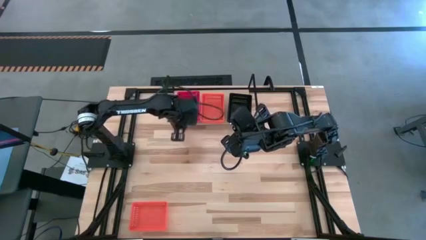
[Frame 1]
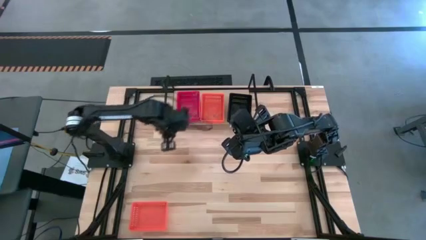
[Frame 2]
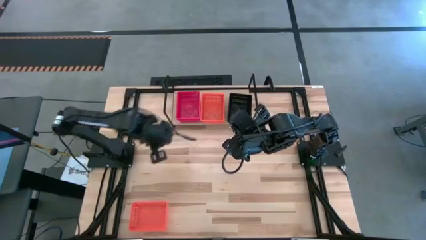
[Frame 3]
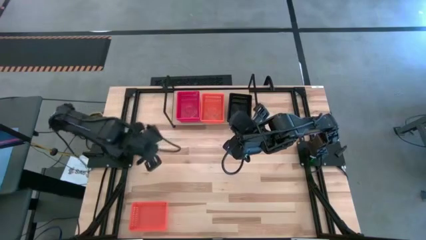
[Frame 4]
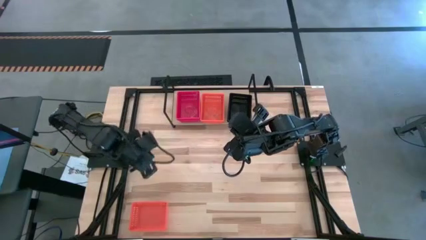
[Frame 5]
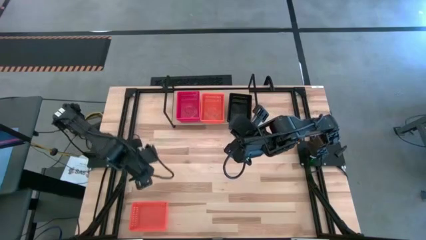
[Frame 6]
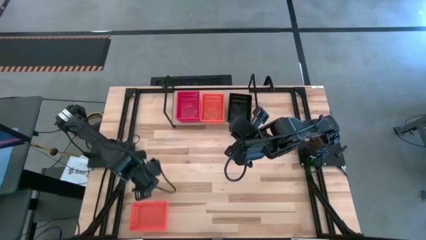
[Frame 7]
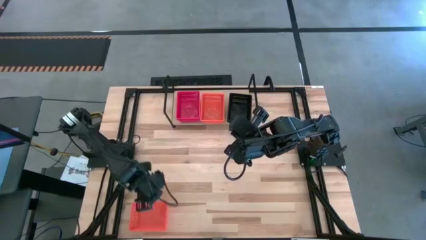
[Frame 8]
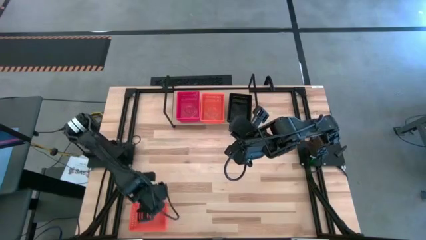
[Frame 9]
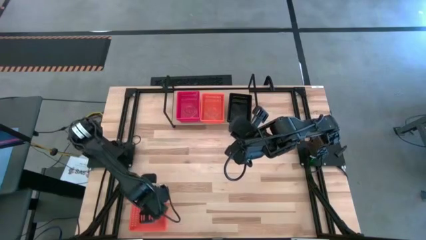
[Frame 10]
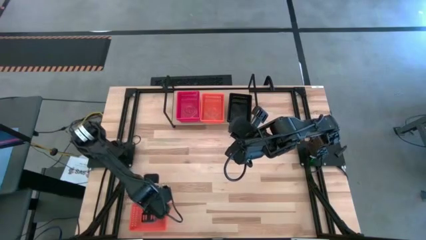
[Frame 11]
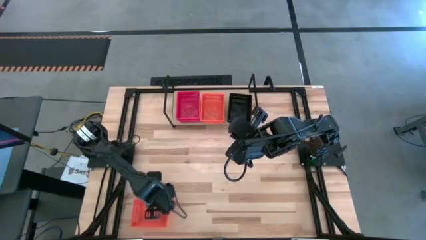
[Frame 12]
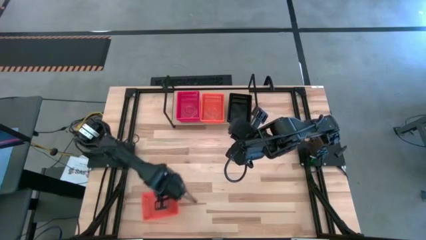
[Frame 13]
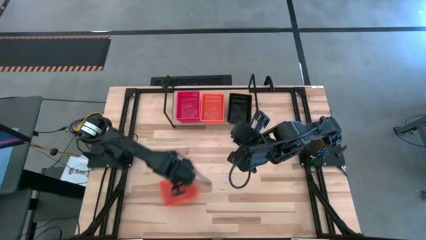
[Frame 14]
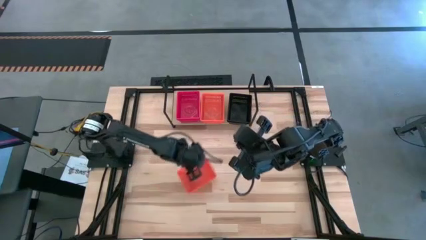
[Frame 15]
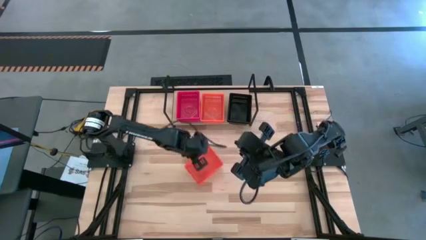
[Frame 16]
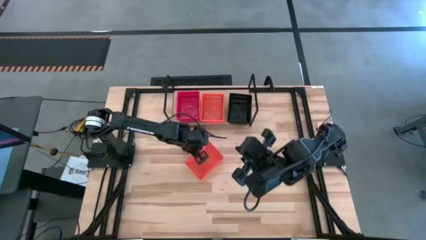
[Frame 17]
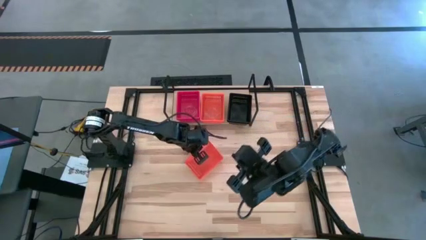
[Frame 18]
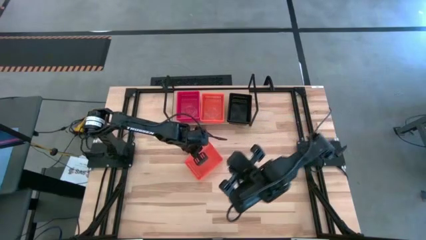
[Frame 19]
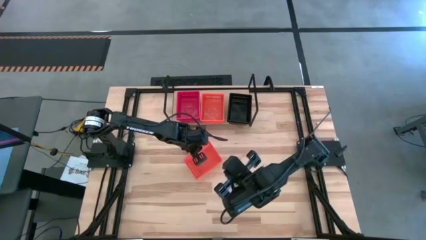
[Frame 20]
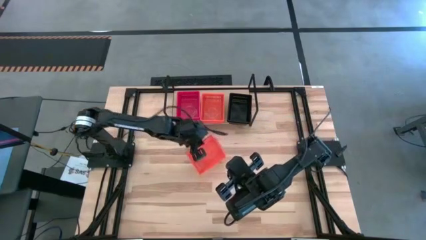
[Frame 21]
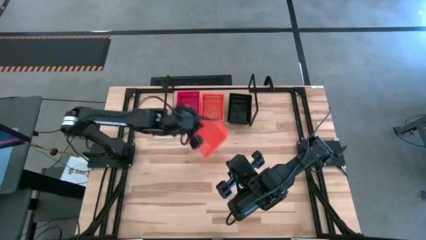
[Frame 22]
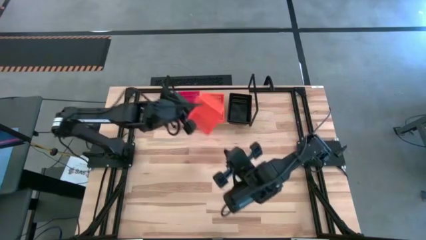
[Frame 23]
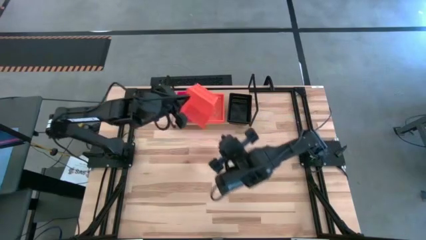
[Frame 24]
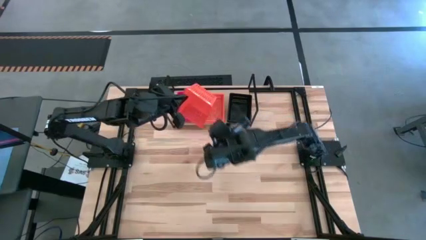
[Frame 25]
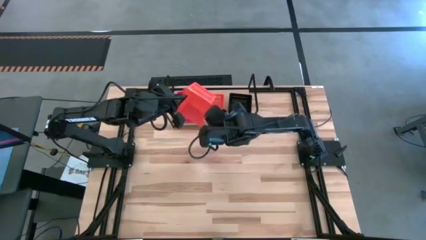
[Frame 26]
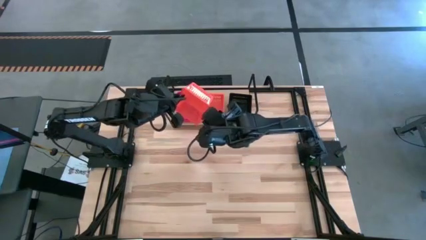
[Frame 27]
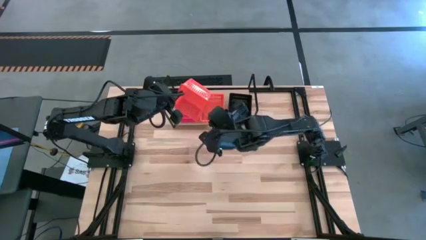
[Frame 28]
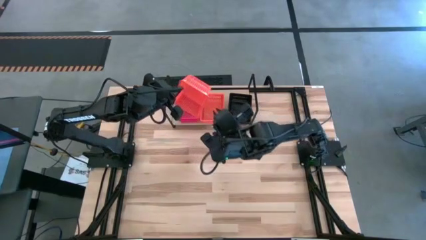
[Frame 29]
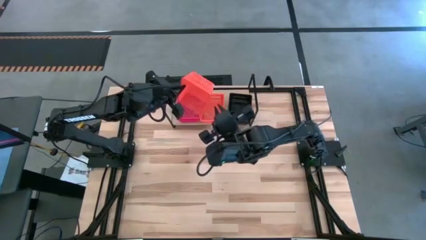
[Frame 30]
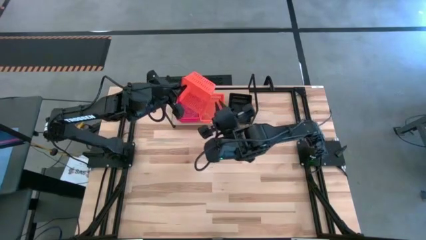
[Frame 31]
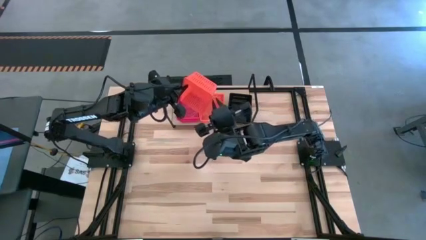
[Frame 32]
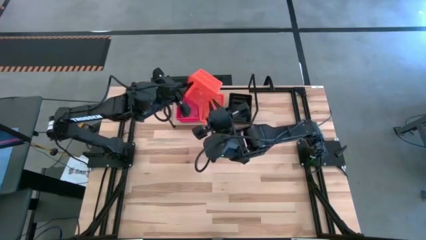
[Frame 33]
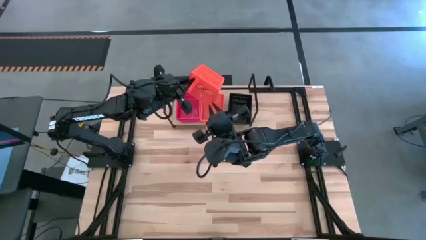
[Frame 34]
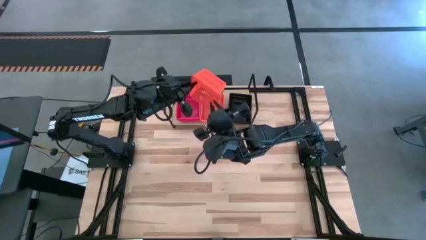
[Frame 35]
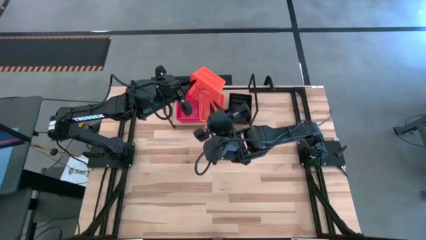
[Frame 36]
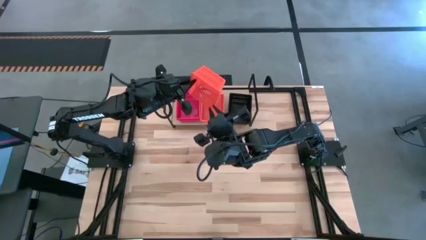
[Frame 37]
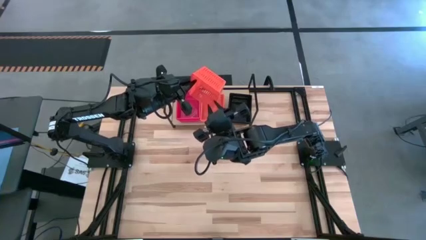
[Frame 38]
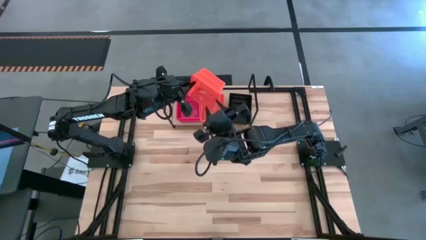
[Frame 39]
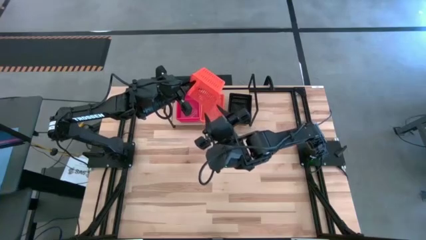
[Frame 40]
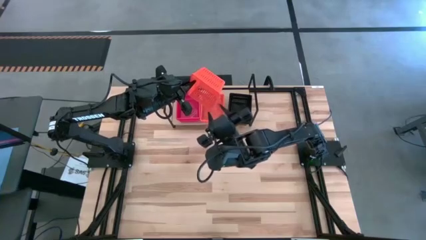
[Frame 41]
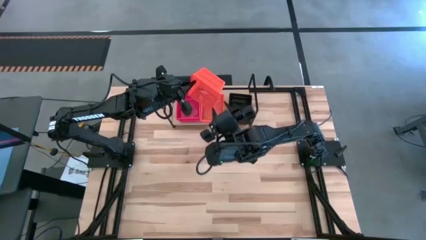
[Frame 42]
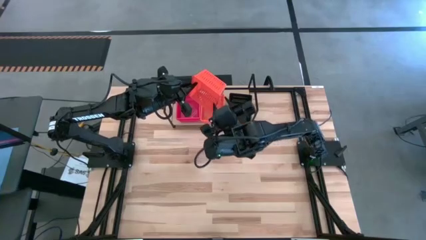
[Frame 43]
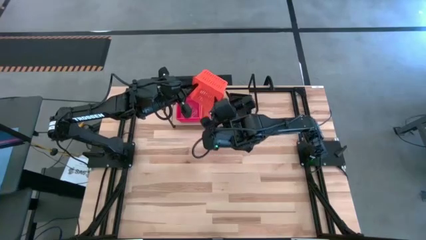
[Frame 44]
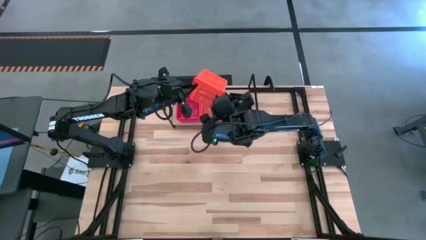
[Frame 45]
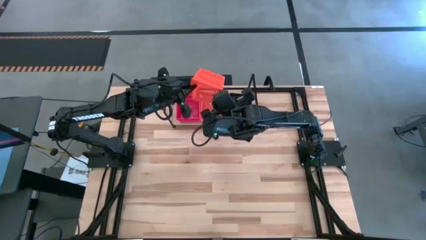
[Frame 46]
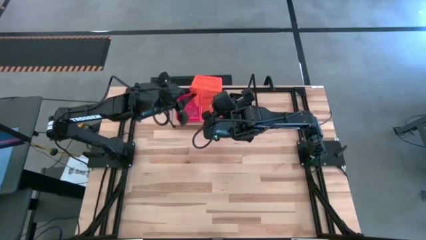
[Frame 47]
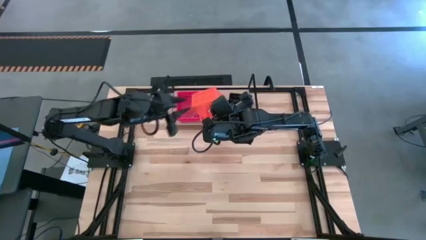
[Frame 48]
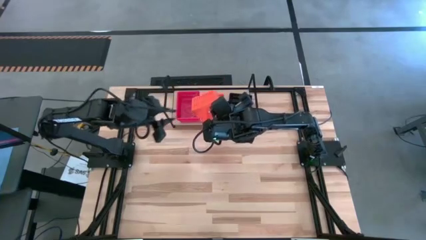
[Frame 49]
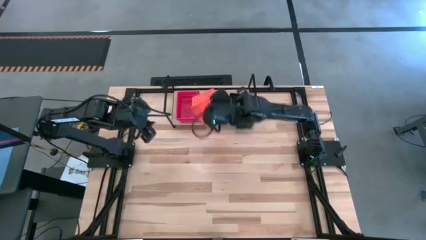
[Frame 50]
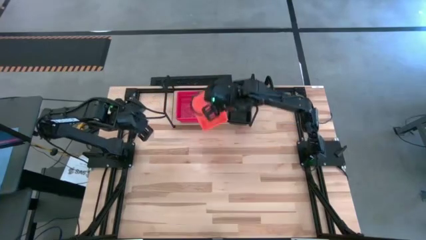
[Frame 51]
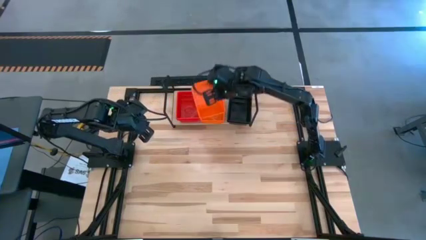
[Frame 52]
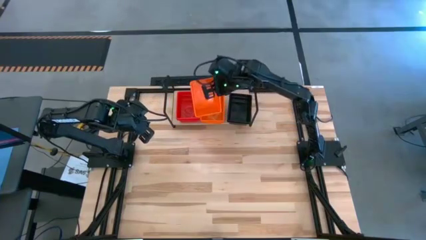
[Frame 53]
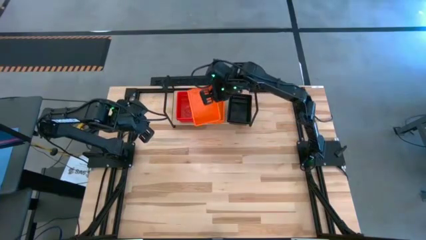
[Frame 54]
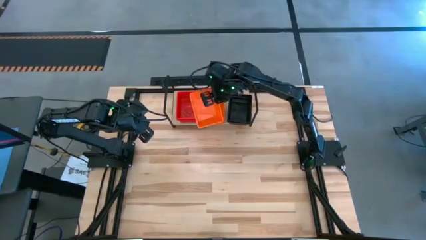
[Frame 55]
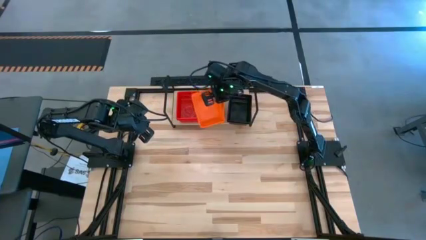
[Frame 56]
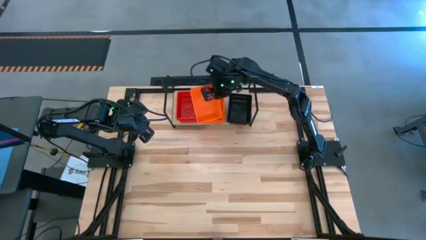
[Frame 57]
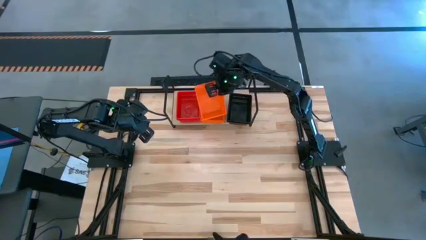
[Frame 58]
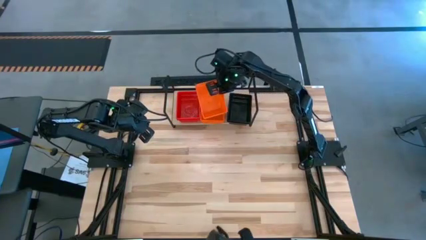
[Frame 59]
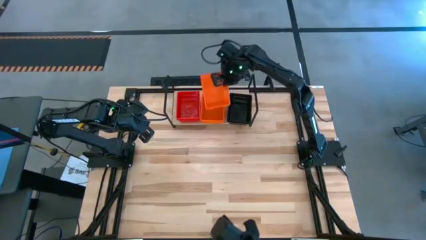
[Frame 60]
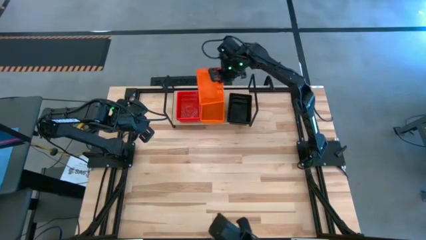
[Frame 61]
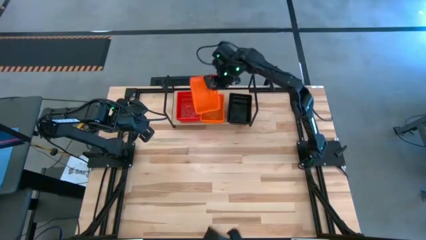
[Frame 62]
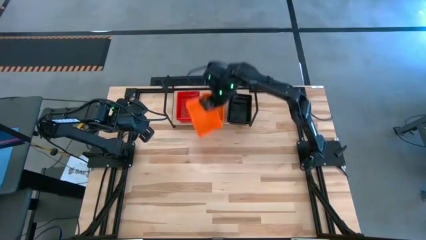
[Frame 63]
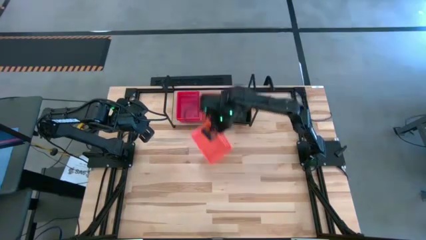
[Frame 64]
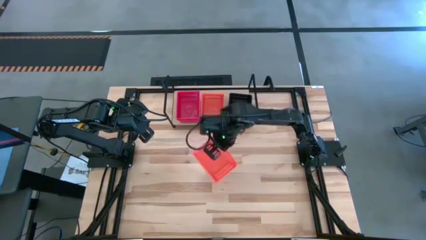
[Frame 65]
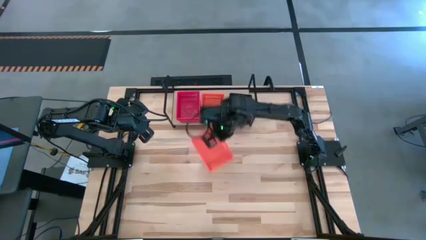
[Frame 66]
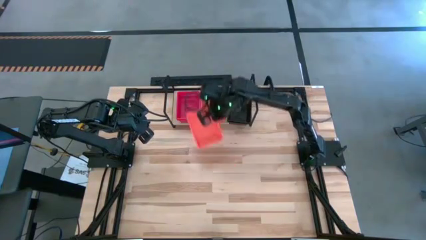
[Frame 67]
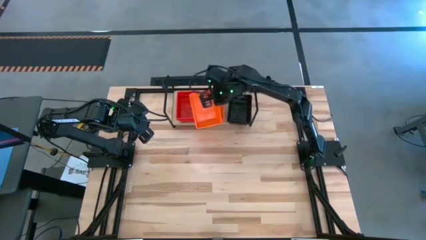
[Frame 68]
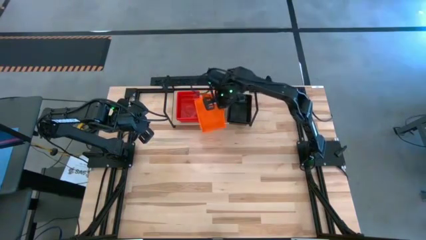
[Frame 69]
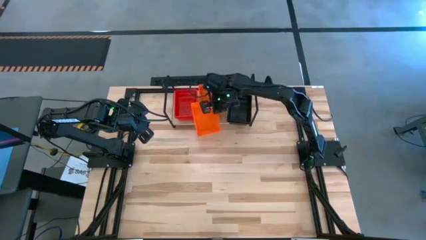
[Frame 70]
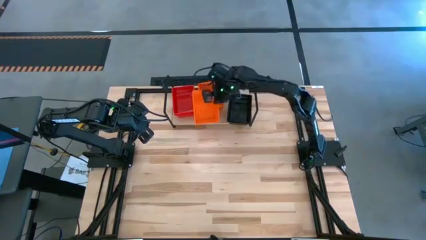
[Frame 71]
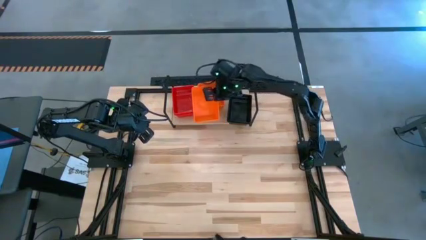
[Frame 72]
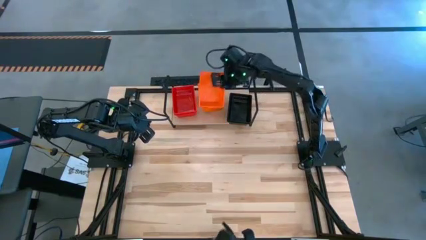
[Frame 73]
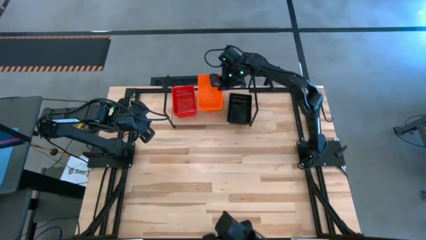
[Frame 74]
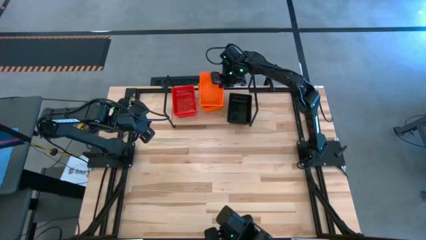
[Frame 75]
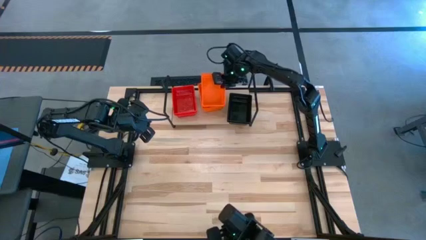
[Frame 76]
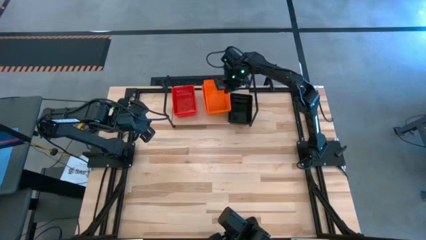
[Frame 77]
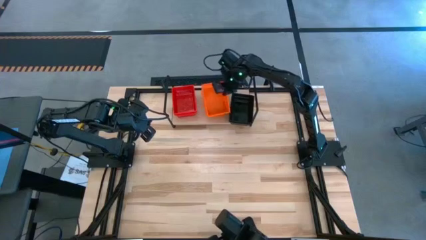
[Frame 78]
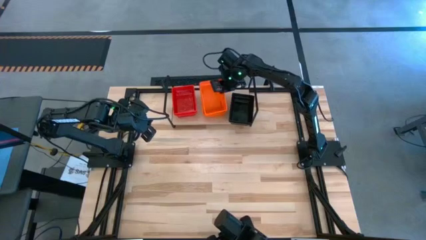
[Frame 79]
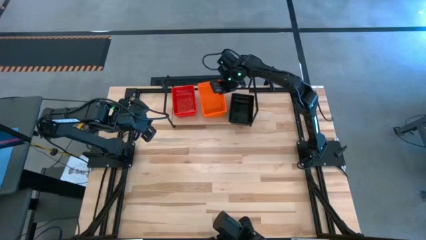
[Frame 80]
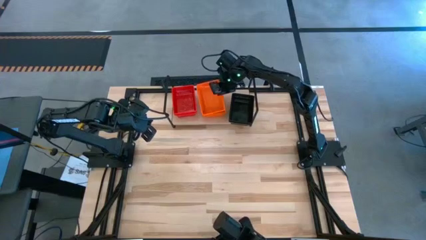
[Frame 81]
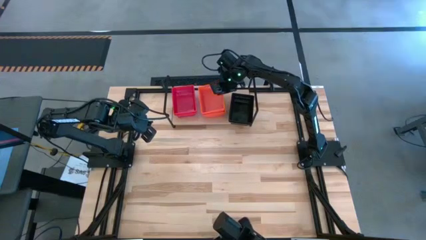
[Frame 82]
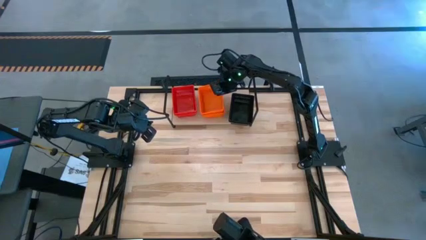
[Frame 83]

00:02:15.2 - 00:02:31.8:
Task: Stack baskets on shelf by color
Stack the orange bin on top of the orange bin on the shelf
